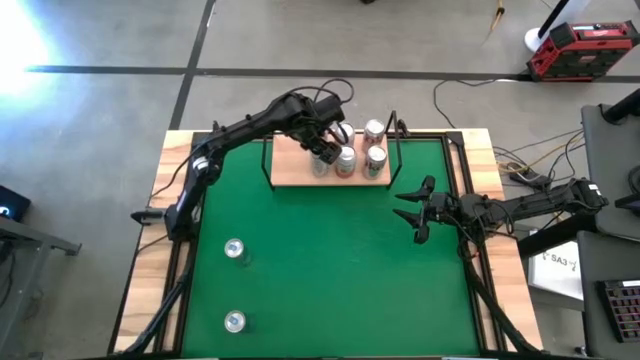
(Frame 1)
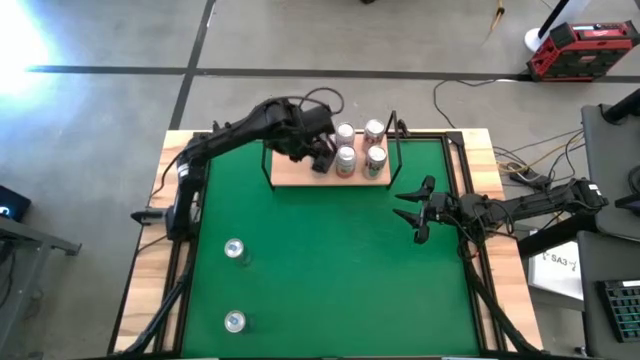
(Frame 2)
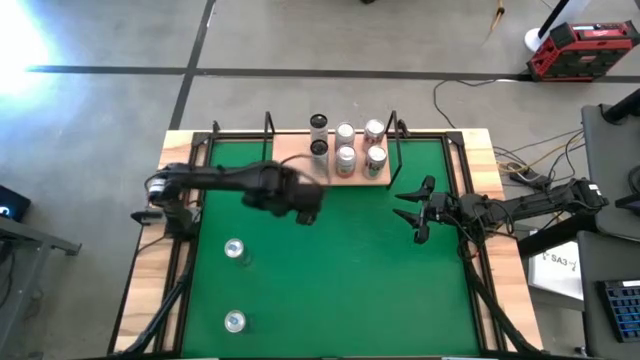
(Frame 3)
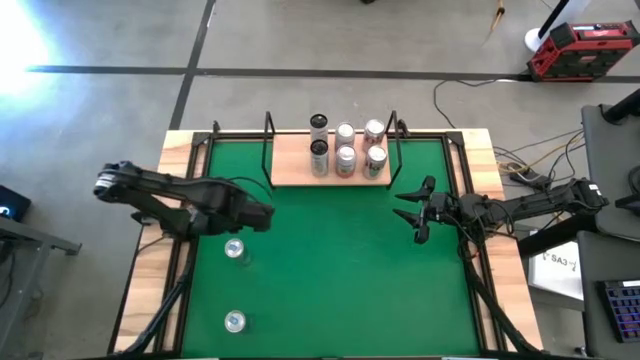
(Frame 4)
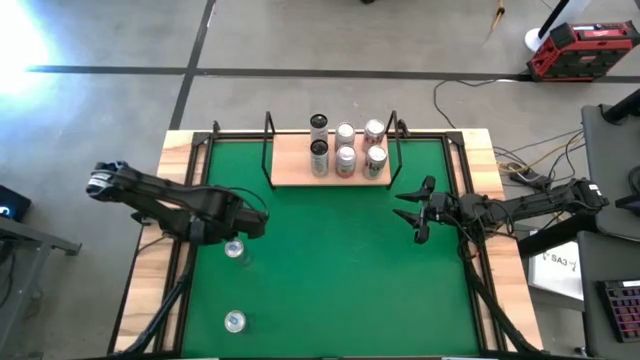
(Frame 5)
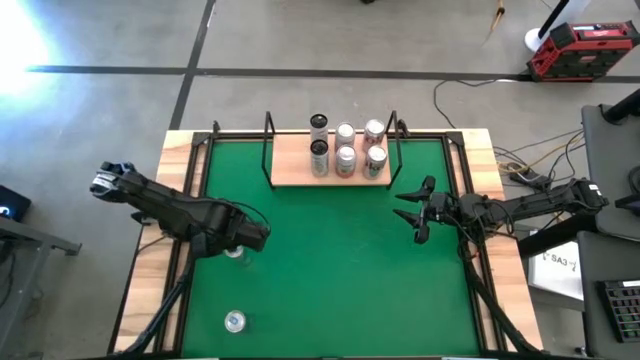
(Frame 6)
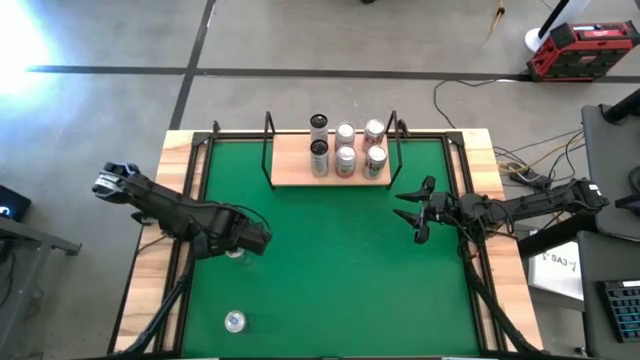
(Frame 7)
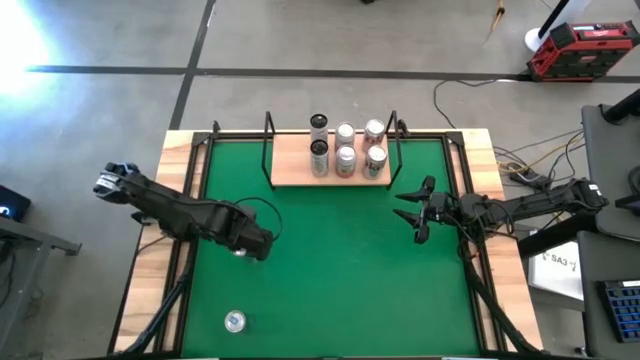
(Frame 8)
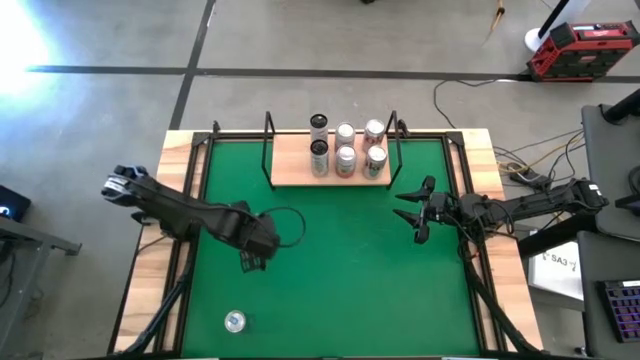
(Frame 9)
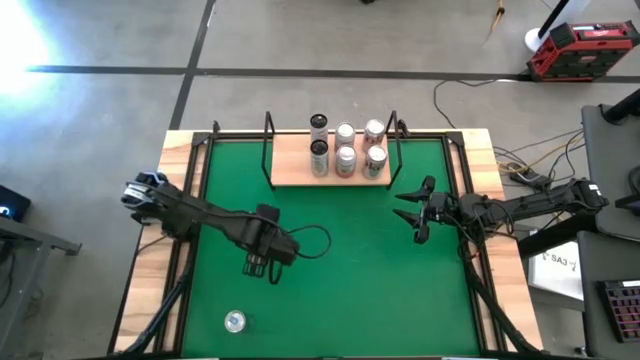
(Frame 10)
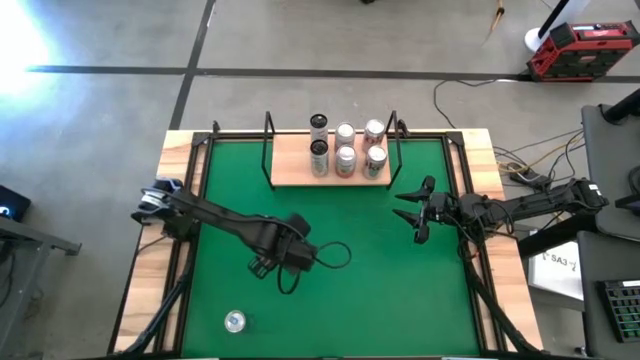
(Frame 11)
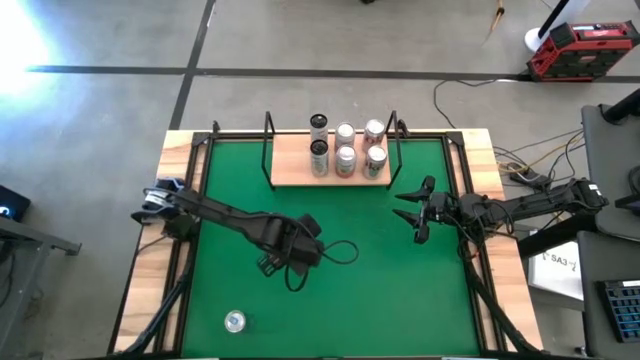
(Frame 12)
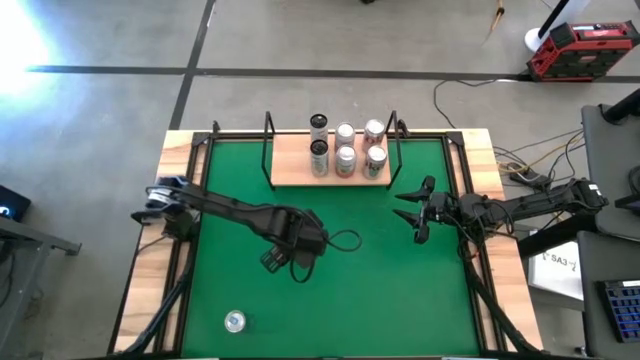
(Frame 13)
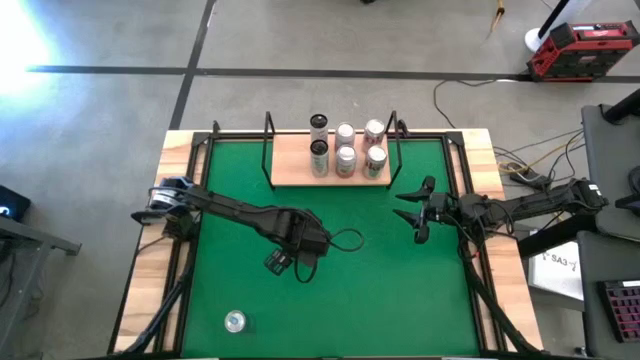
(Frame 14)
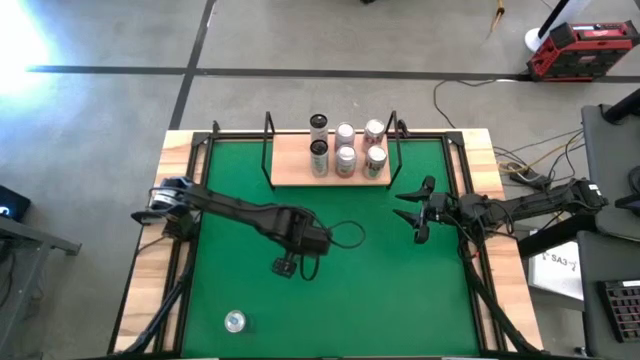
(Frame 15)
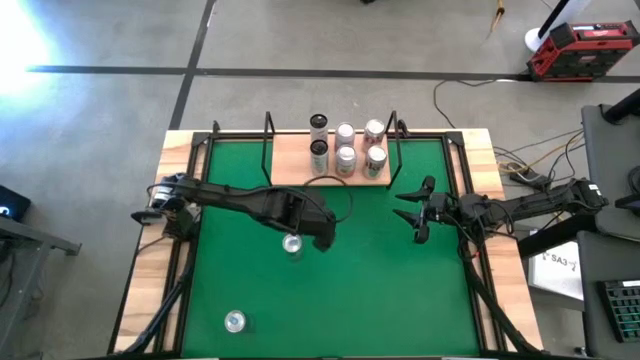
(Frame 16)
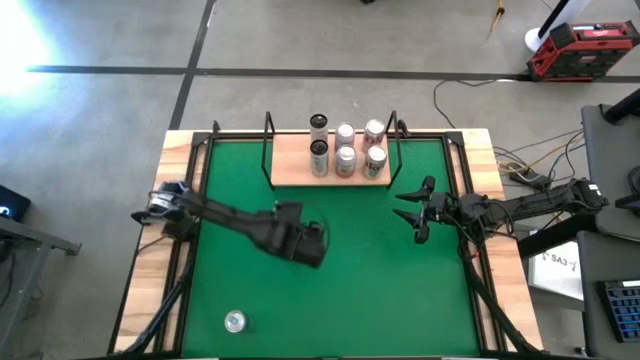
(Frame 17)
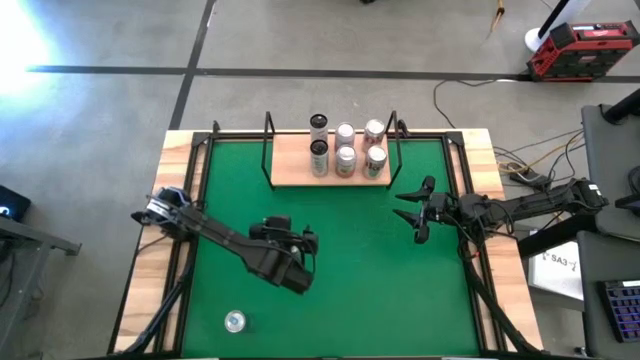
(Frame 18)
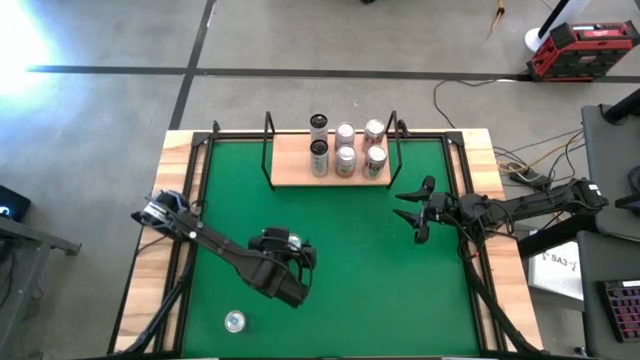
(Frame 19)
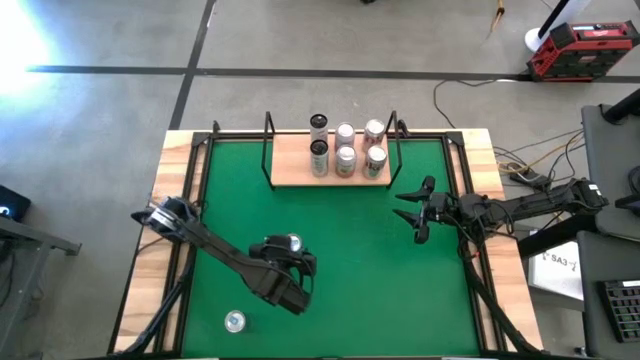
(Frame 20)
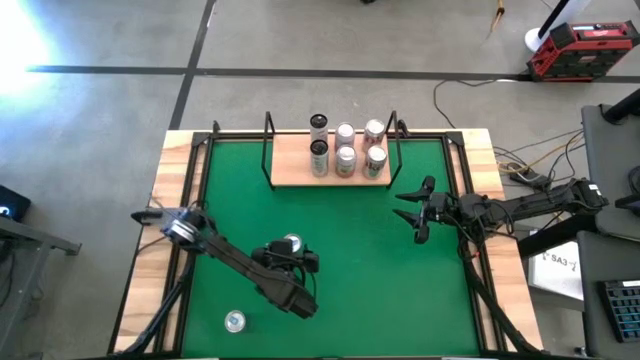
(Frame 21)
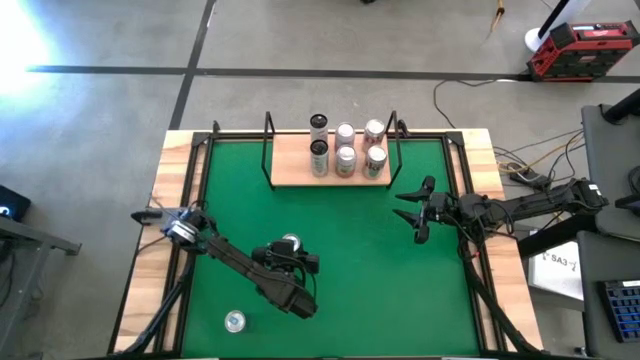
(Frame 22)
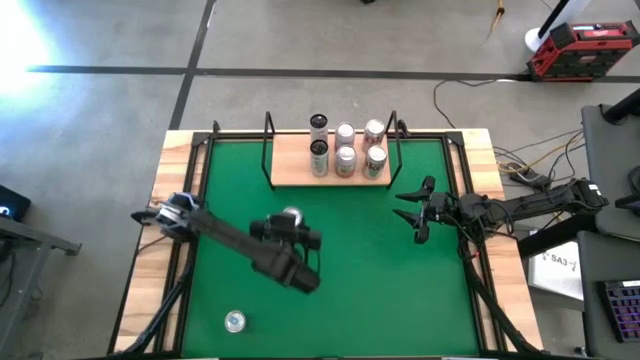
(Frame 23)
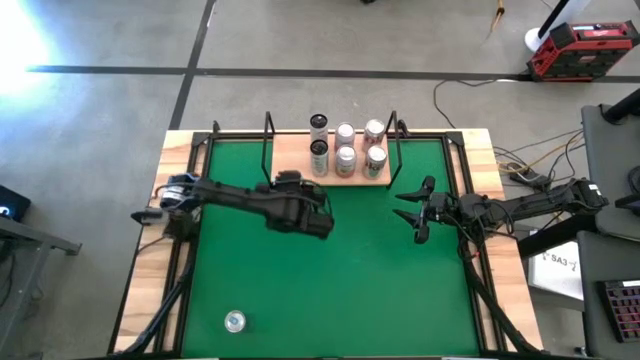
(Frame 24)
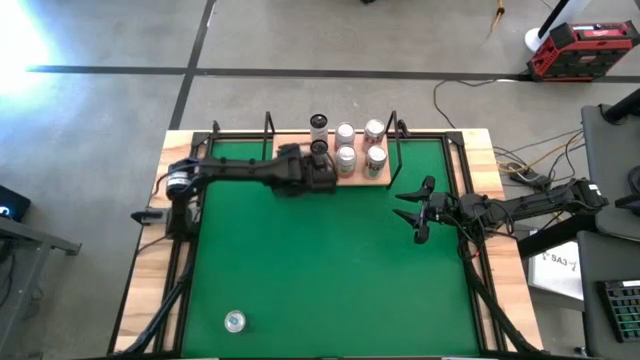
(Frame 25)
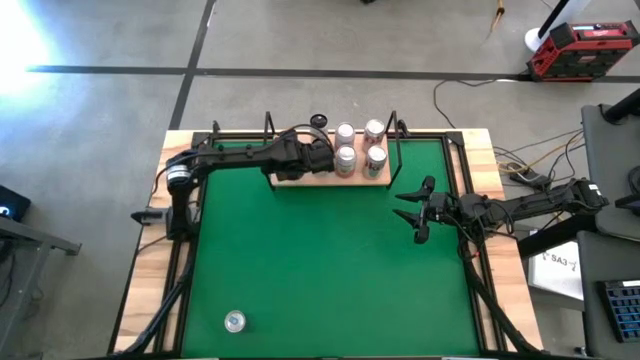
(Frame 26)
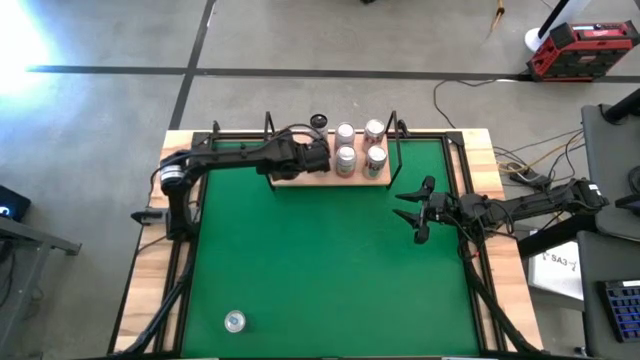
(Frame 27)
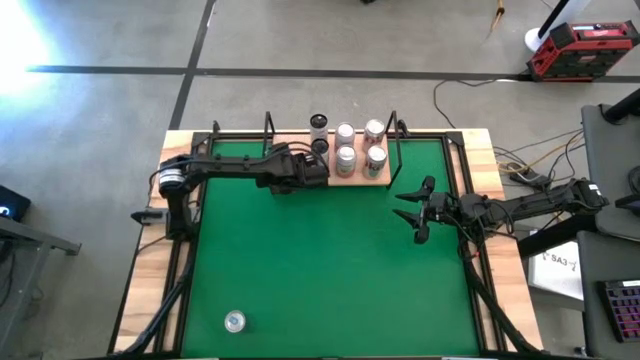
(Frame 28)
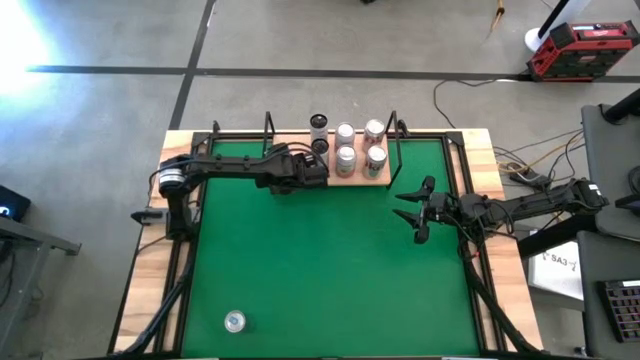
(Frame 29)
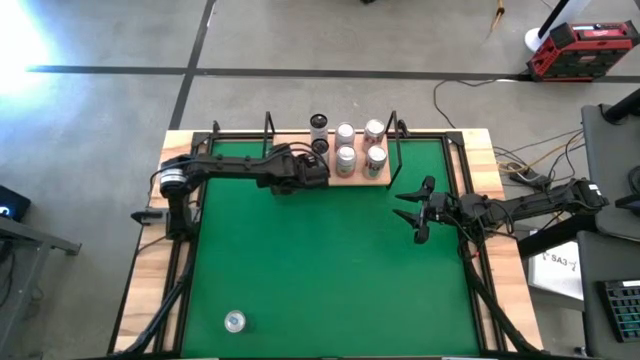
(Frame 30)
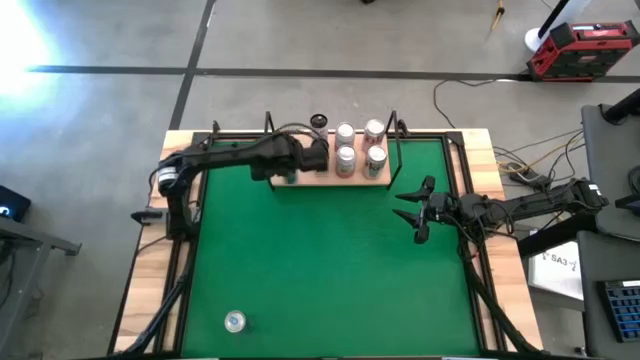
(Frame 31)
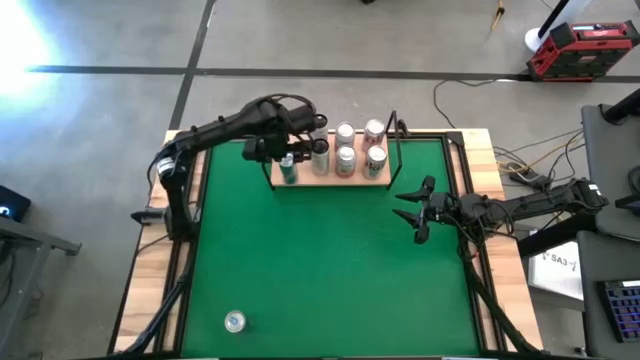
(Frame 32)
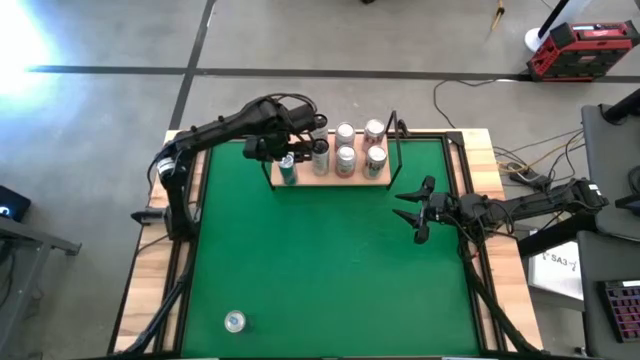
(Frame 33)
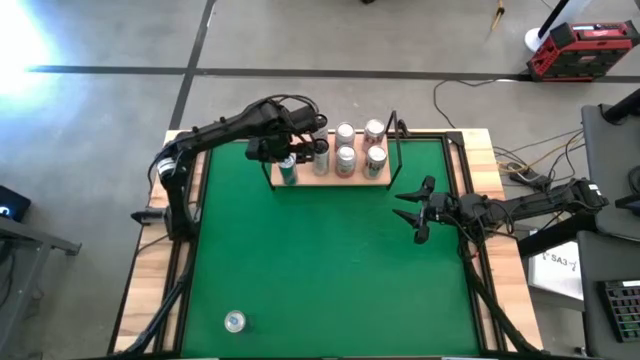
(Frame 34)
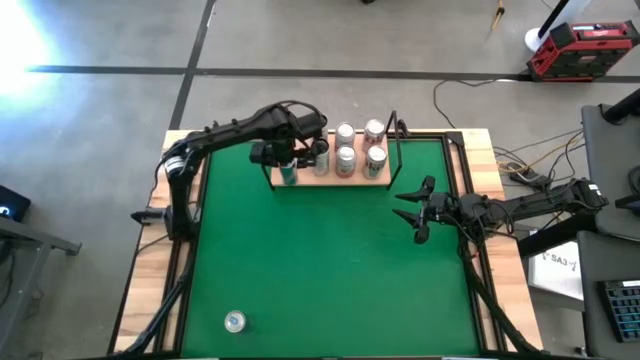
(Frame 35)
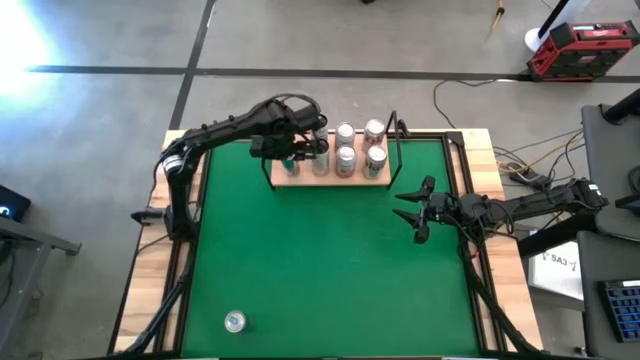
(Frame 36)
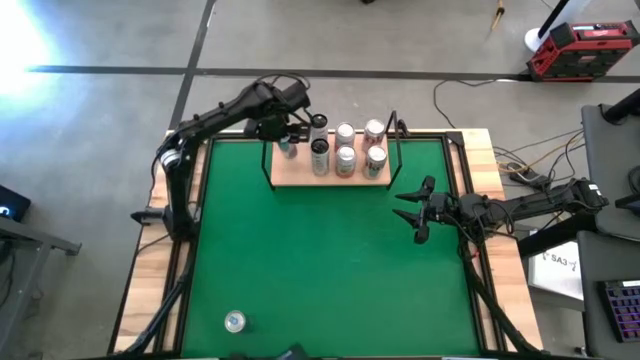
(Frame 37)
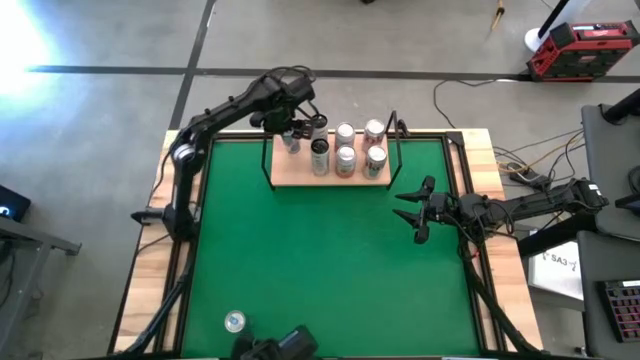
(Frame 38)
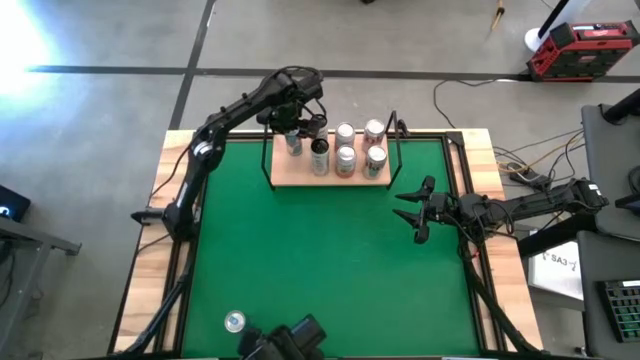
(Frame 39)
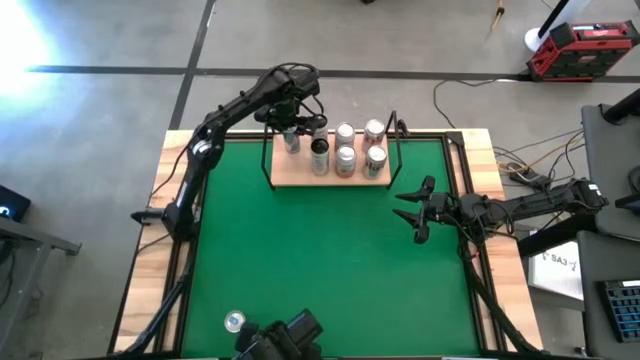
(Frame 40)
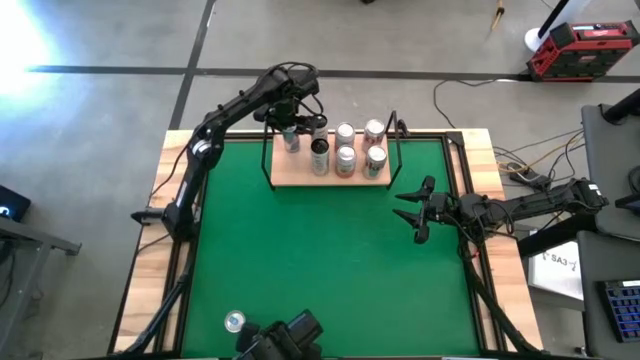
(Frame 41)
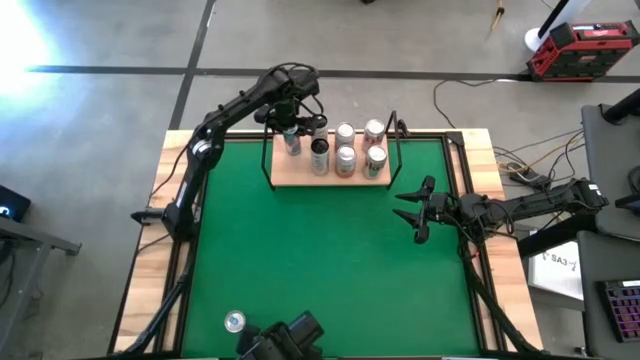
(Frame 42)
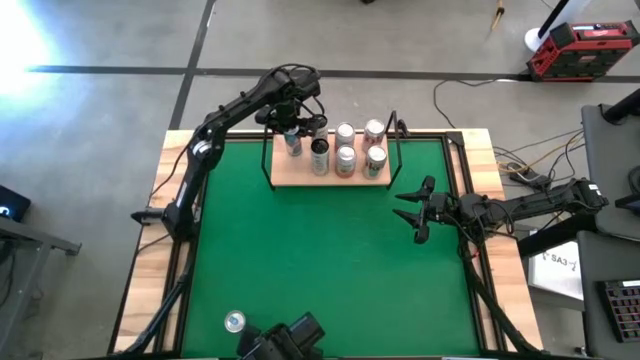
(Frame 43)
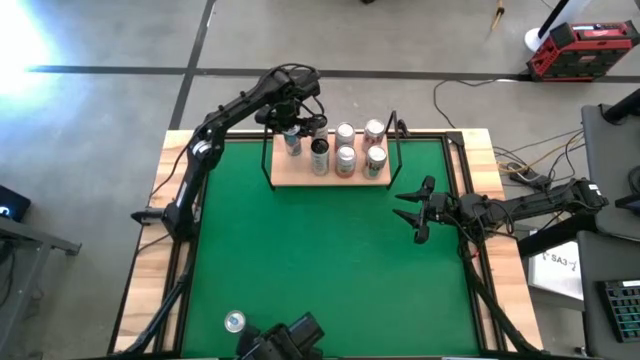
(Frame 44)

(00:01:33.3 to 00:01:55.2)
Task: Place canned beverage on shelf
Put the top blue soda can on the shelf
